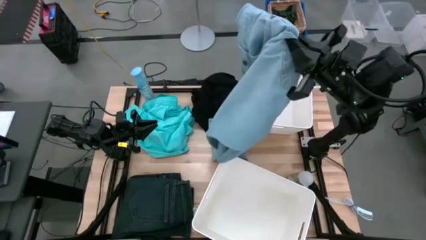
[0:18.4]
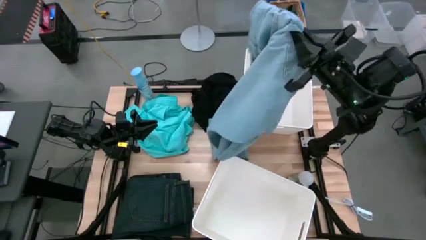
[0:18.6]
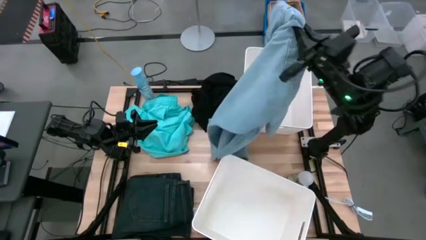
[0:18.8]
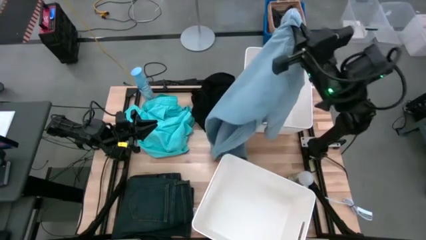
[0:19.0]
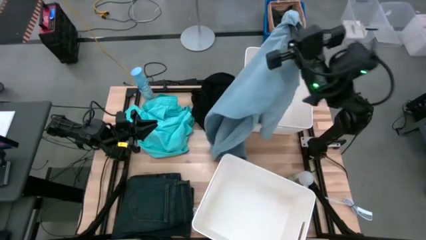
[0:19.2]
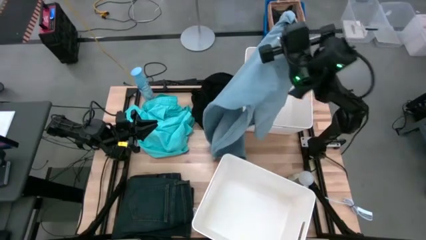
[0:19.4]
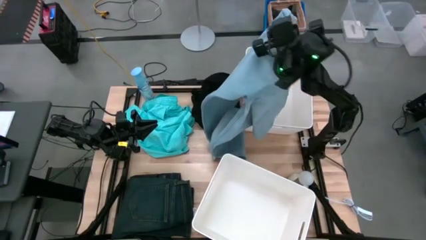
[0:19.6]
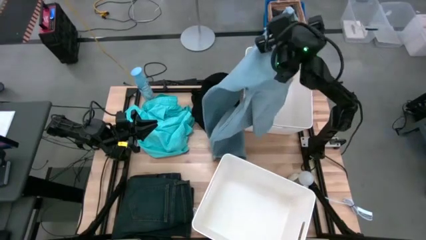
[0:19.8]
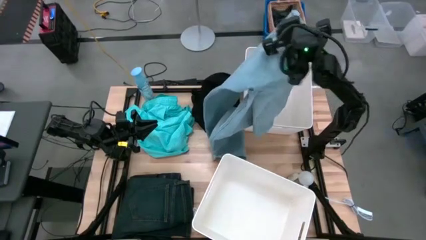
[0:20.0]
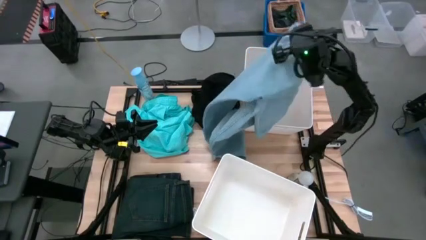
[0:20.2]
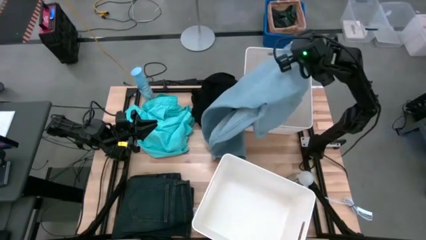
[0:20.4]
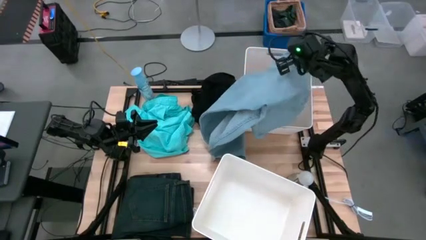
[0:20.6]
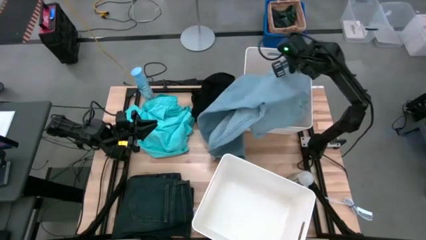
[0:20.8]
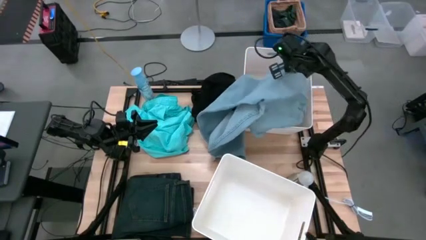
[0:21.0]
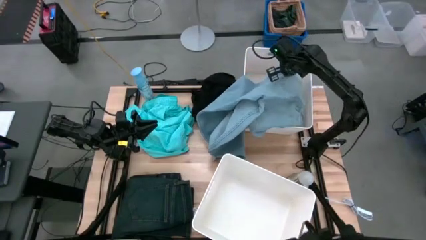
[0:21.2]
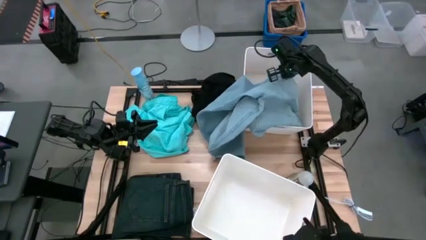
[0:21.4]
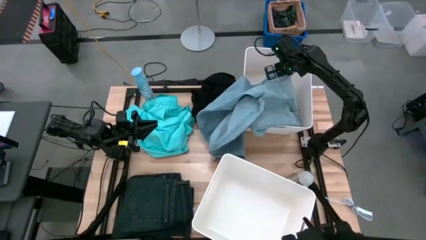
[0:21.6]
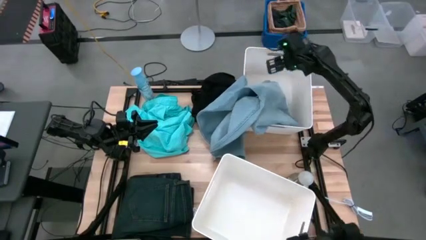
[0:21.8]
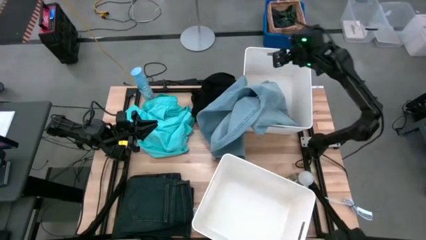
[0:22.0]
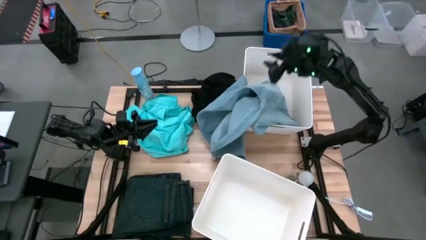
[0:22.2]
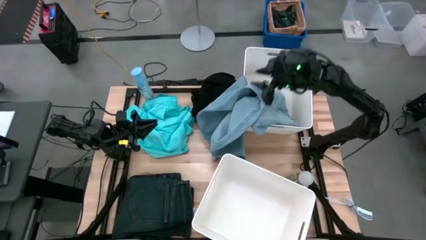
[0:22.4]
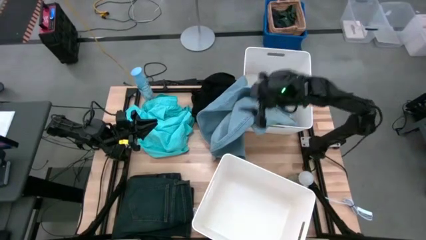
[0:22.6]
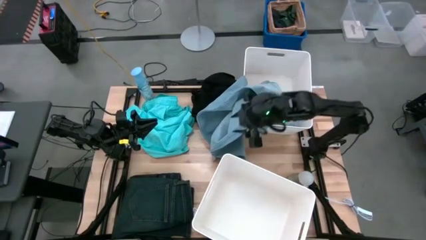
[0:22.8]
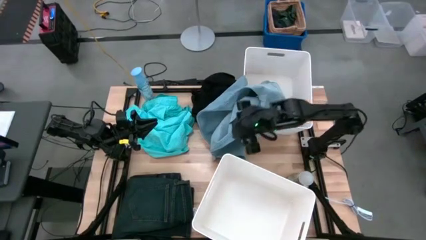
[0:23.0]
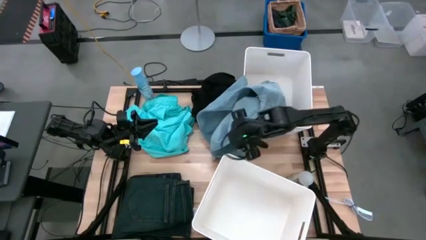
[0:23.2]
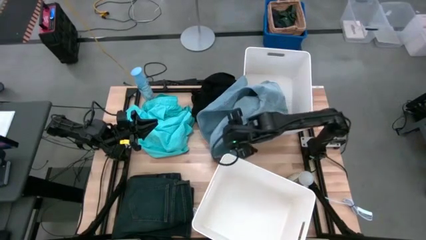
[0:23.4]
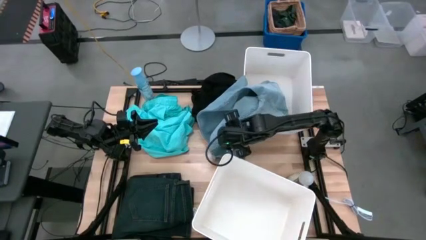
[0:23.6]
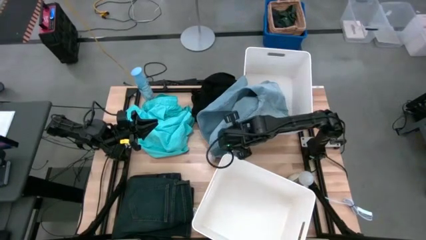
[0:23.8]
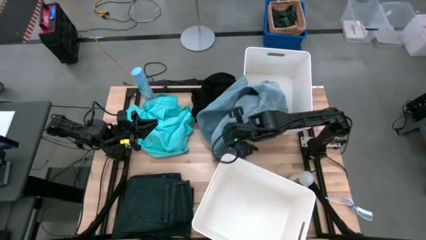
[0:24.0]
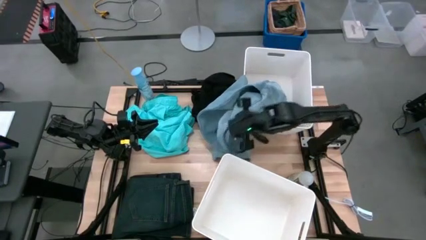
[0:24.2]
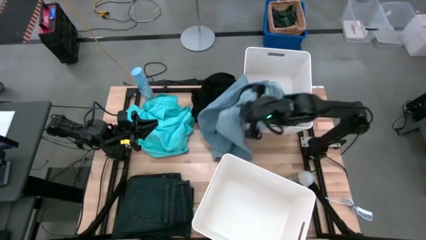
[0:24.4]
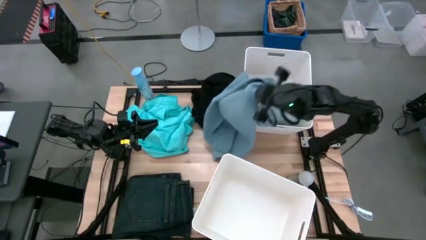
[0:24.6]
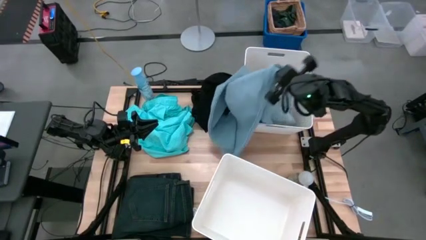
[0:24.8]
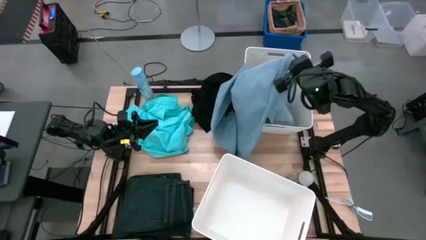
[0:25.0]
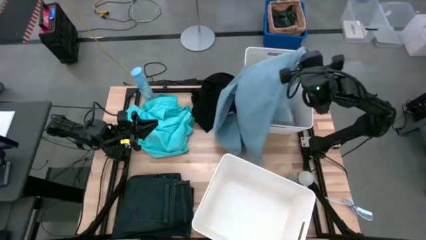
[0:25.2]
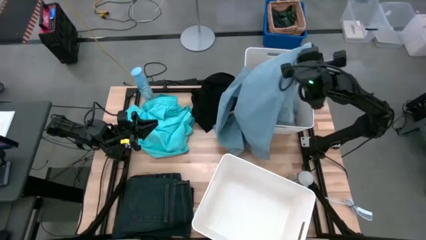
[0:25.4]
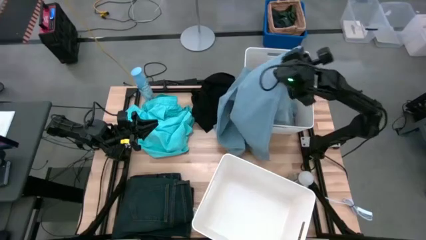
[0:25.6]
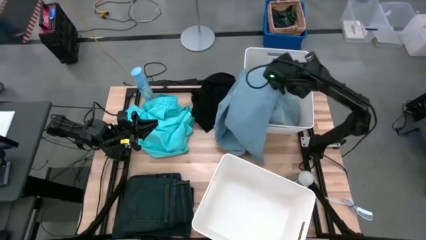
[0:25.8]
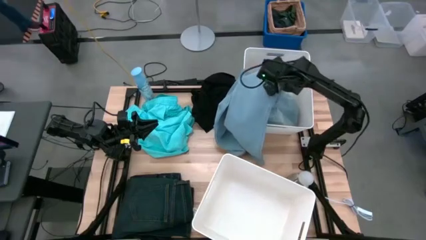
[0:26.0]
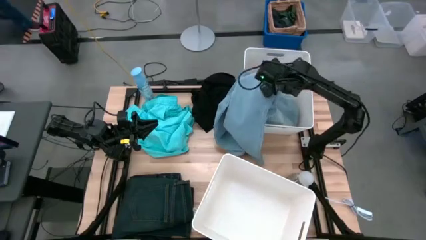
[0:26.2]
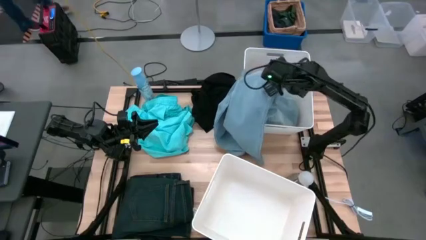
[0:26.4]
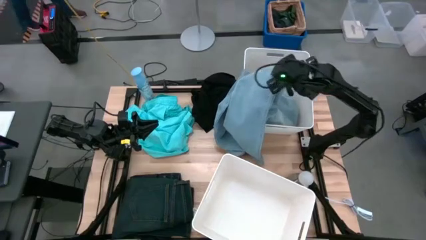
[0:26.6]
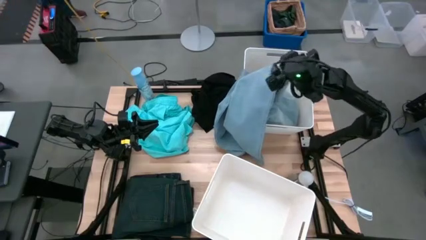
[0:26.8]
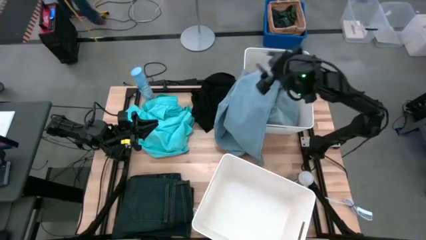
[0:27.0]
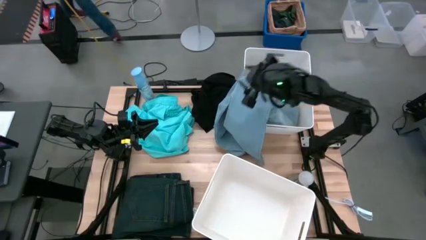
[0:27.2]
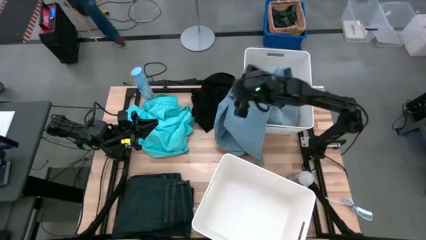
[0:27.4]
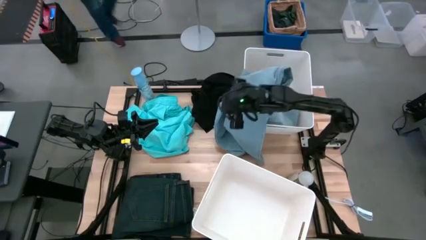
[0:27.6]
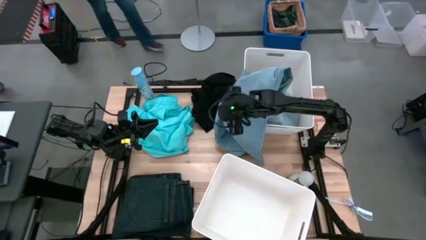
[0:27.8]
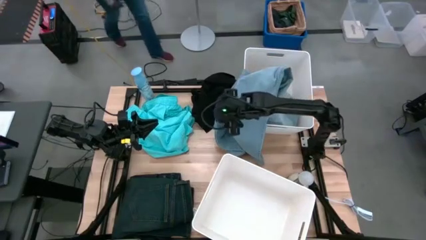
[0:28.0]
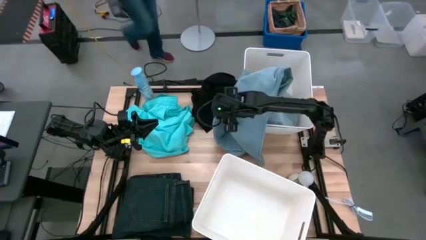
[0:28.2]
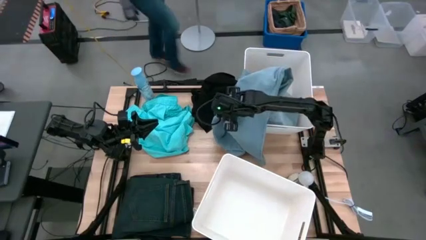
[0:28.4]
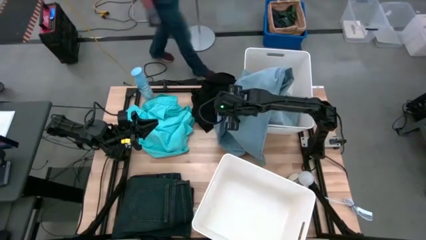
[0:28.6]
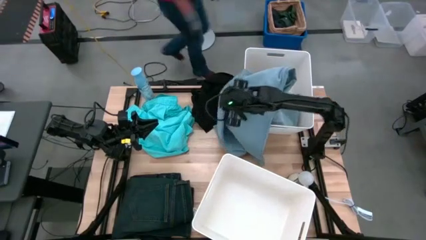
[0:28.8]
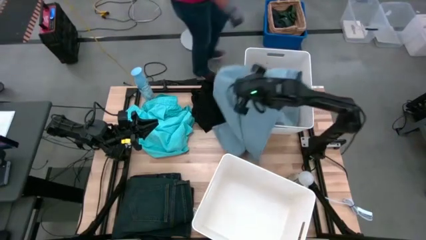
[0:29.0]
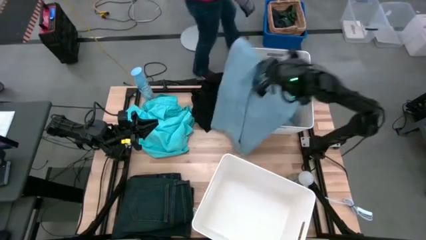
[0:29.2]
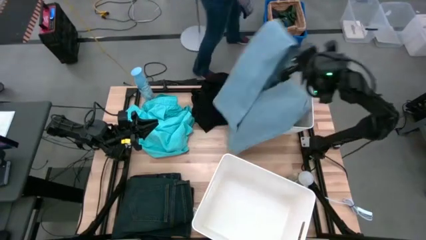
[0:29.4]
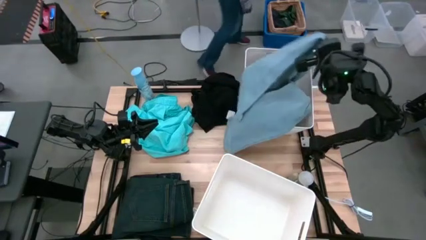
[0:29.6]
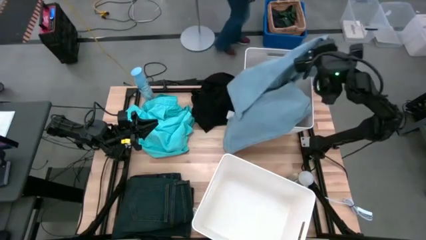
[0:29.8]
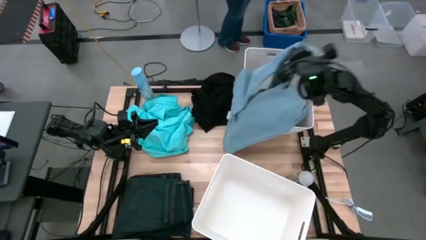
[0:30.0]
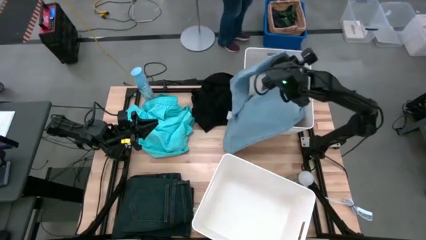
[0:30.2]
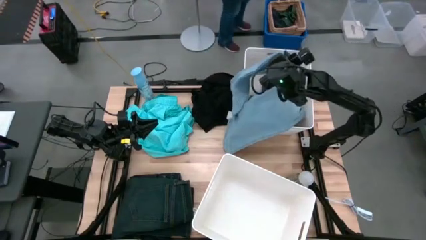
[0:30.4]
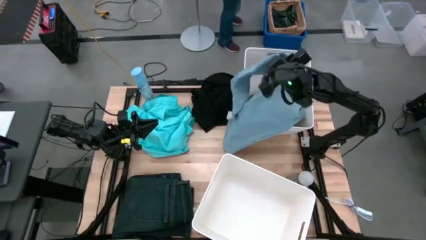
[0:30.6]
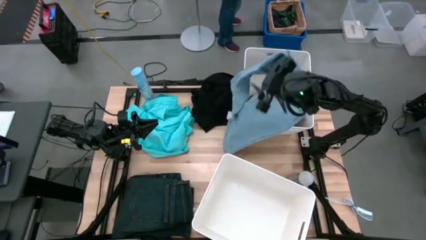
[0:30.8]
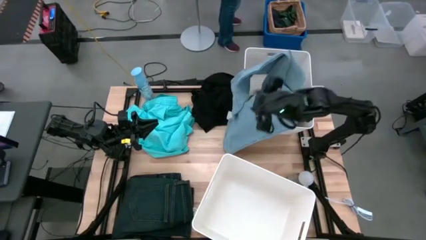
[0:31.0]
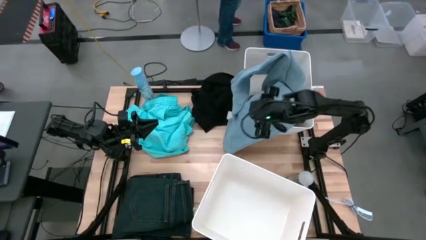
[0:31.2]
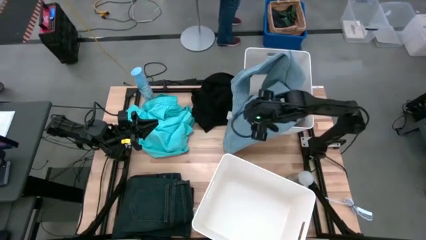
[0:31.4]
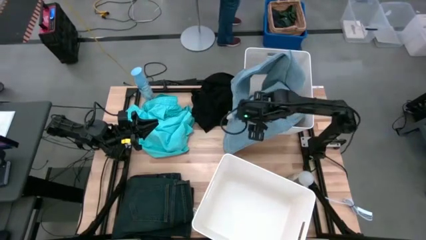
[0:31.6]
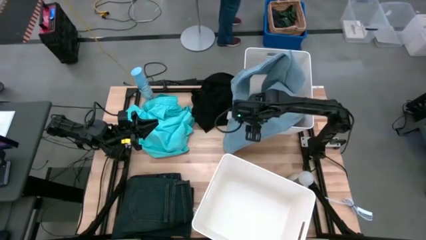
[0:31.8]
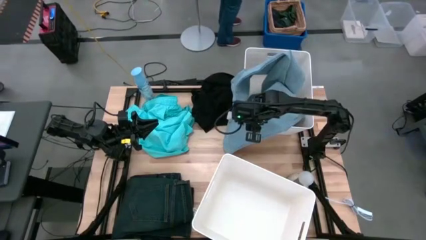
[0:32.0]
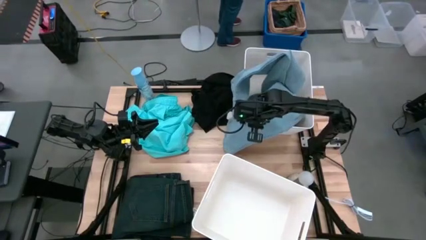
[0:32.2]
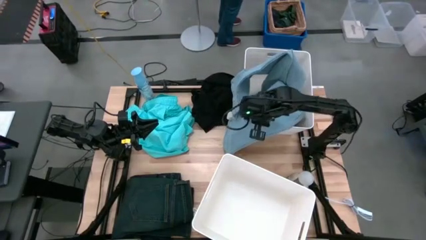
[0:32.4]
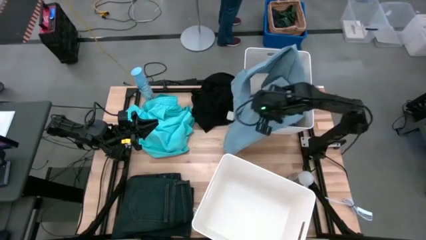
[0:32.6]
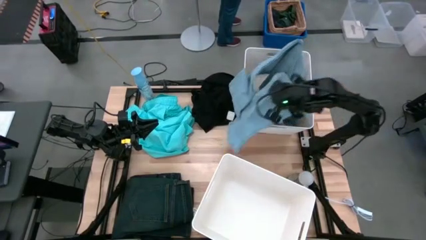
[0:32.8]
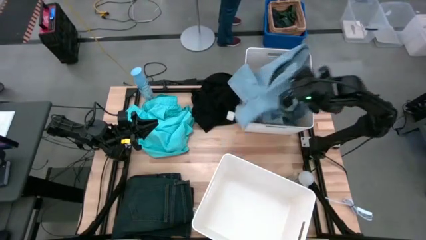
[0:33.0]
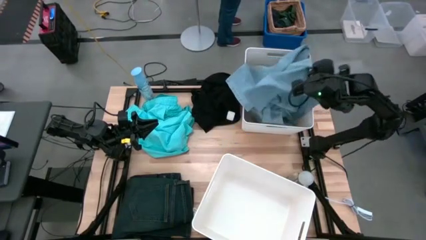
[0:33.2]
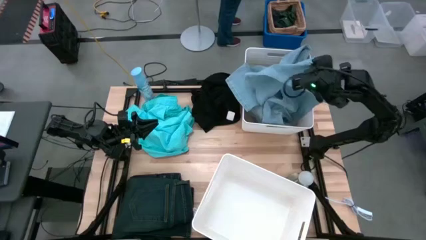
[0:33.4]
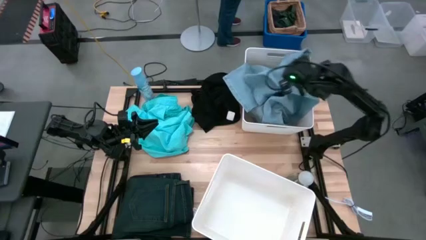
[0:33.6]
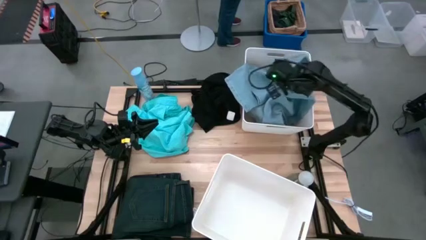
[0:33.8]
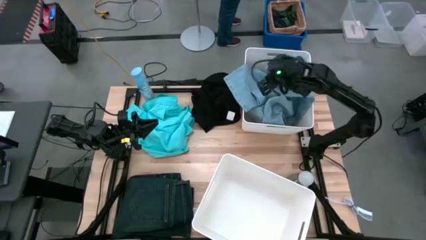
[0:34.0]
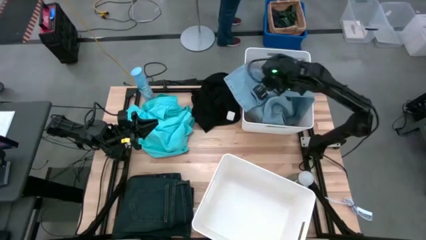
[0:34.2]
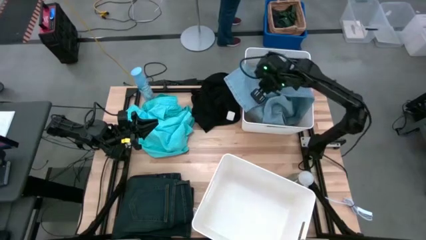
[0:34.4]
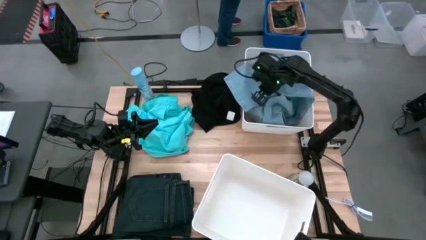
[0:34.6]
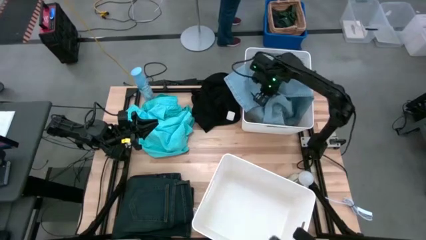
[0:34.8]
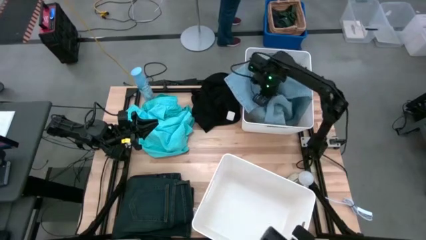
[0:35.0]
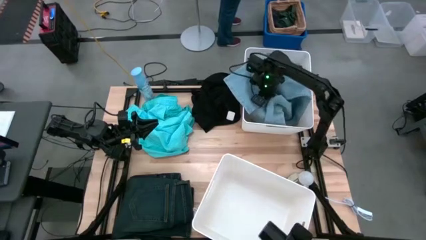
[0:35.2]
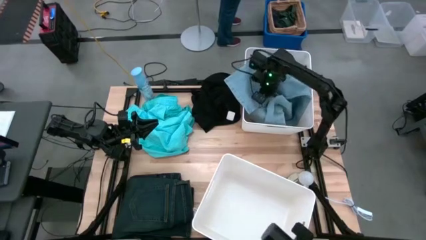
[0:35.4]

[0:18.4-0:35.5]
Task: Sort clothes
Put the light blue pants into the top white laundry bin
